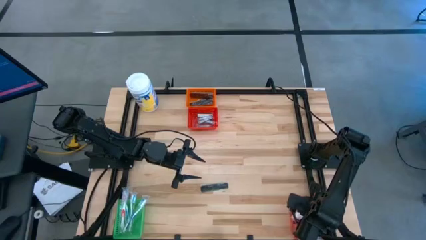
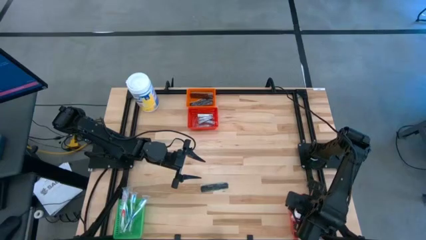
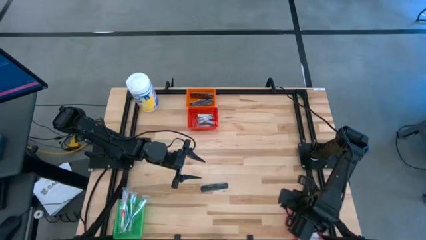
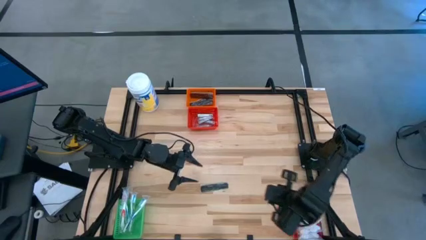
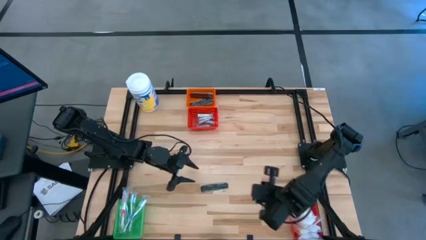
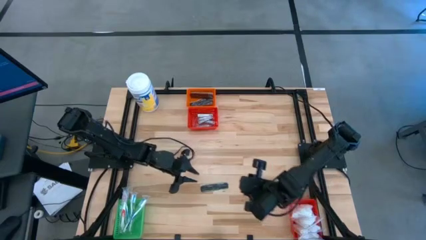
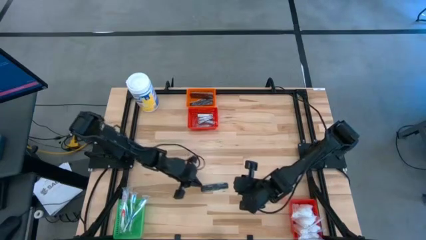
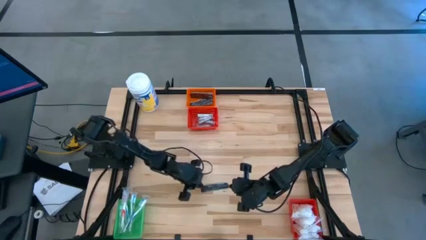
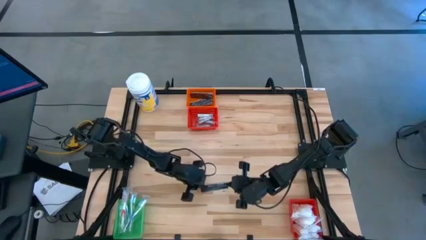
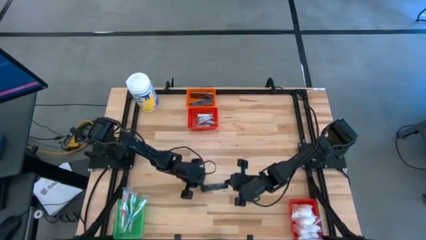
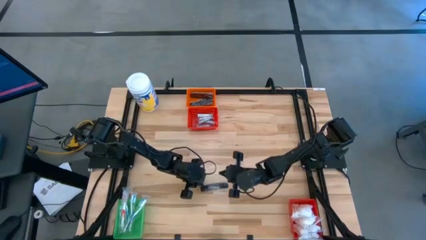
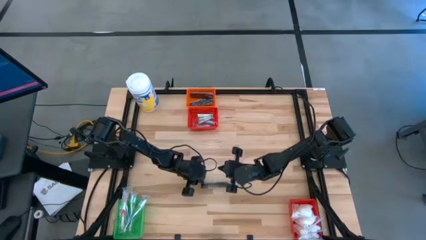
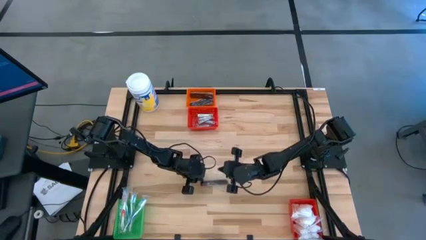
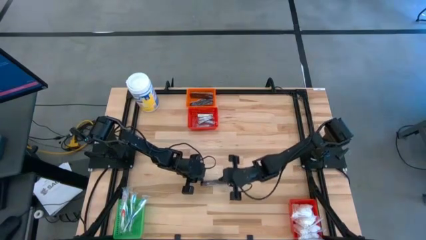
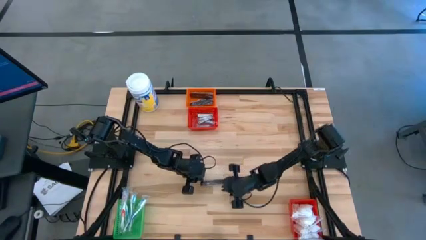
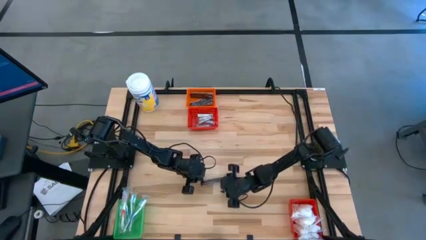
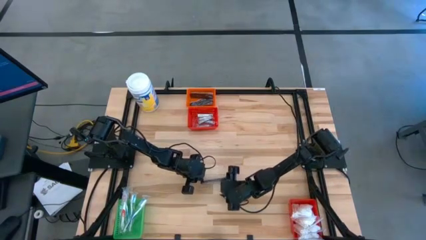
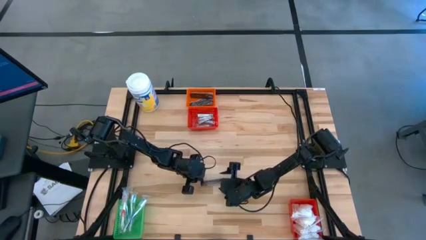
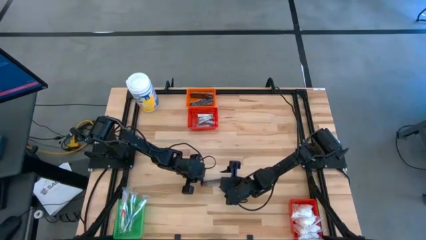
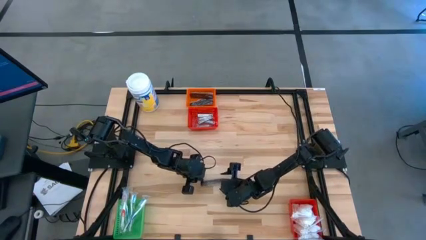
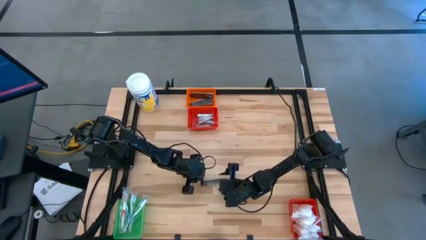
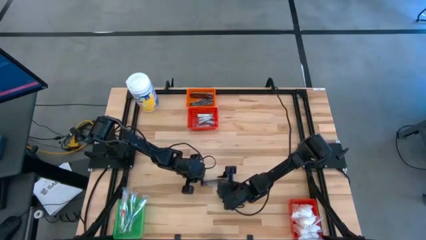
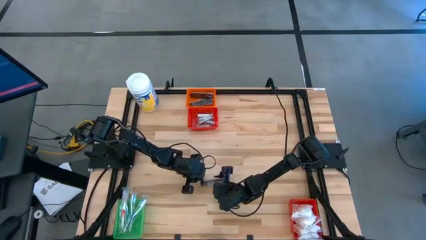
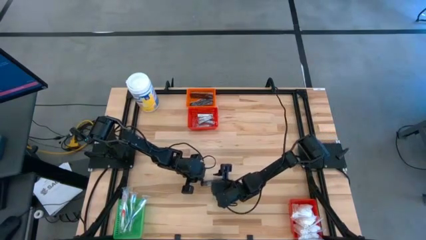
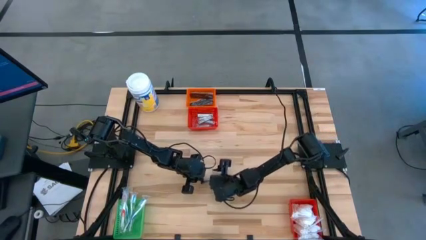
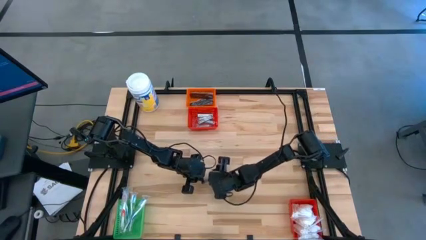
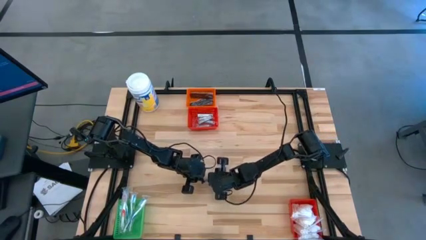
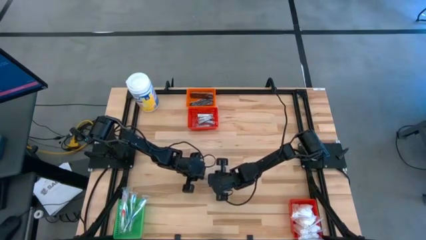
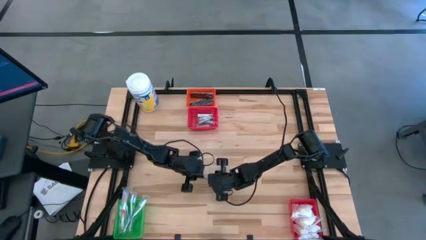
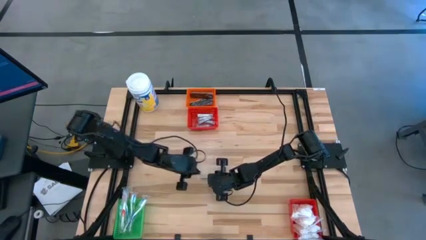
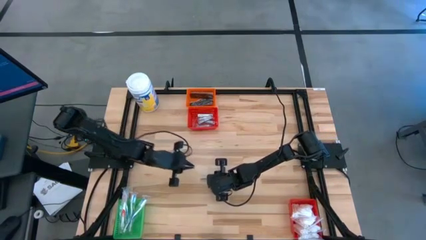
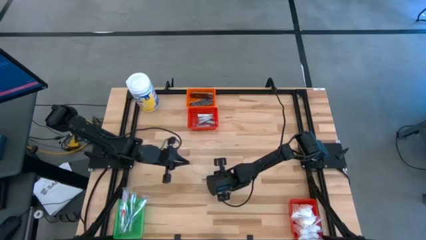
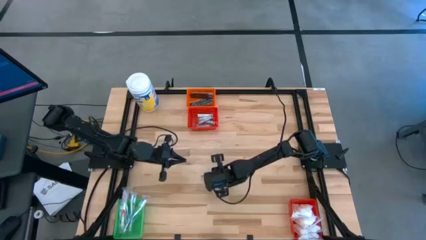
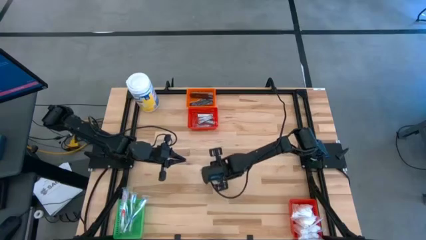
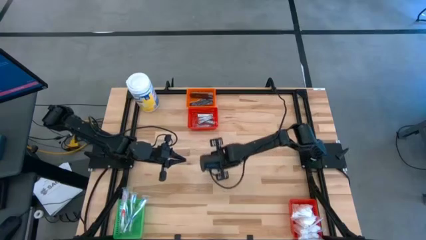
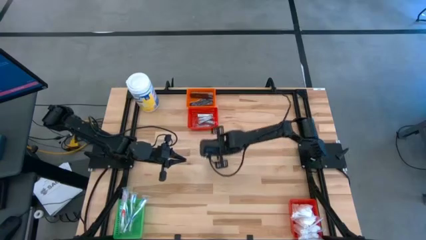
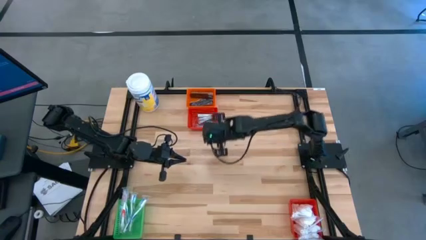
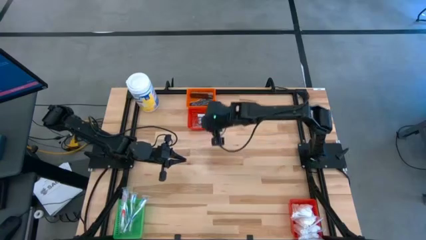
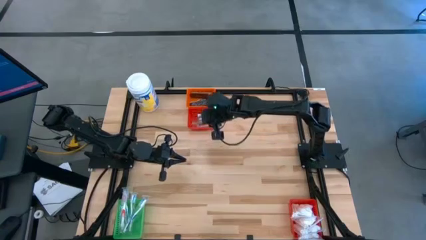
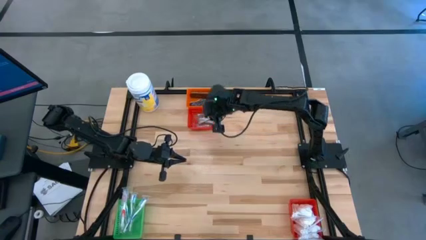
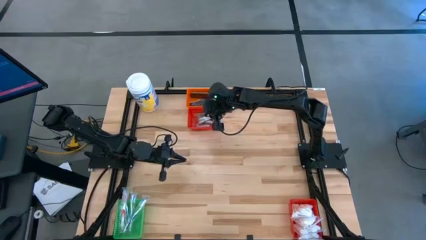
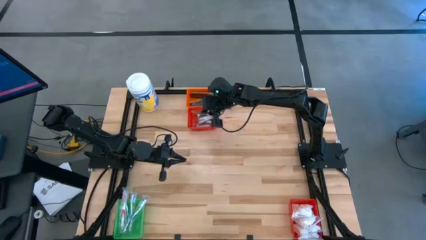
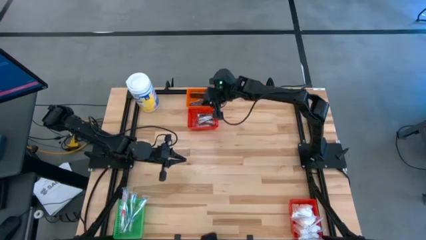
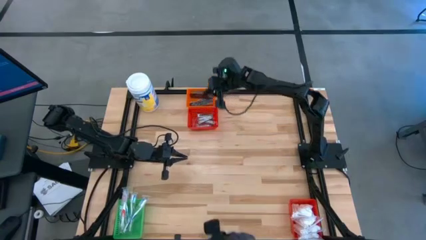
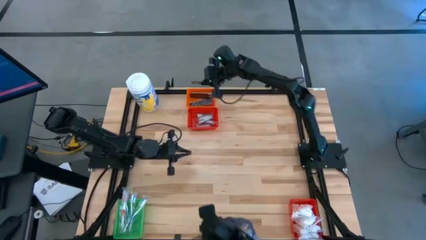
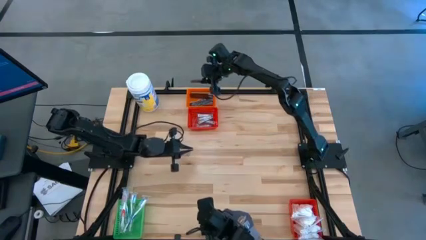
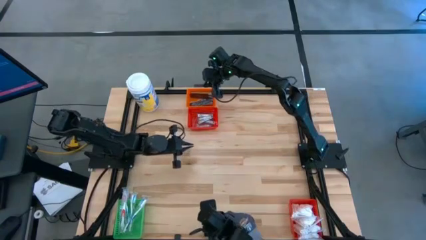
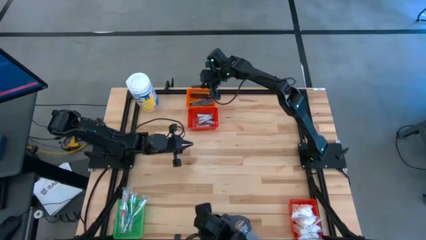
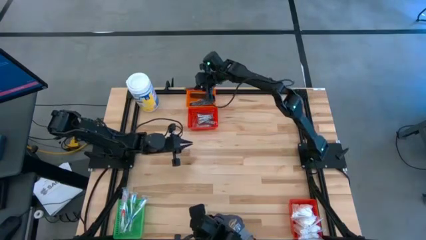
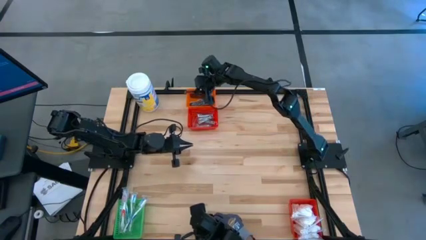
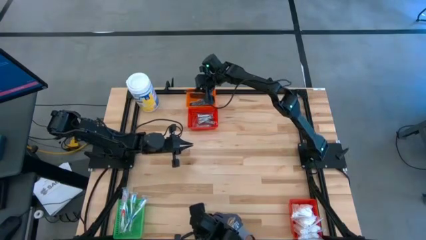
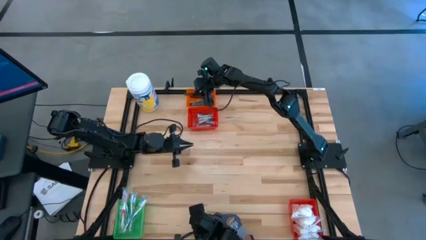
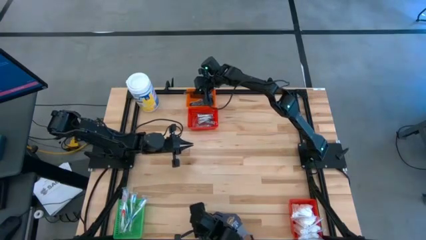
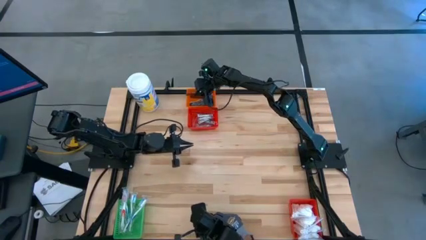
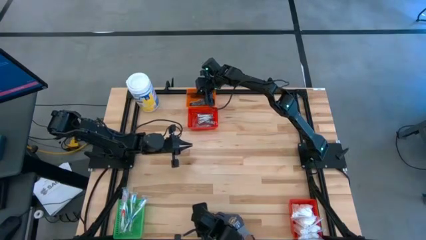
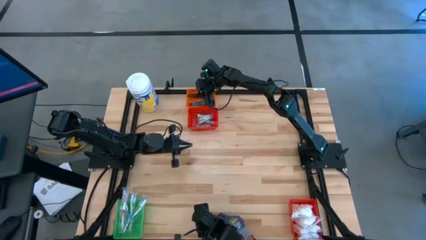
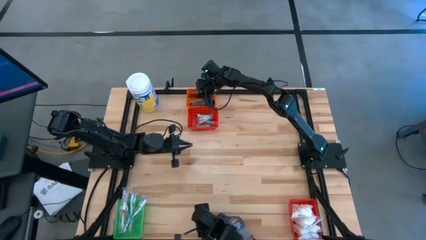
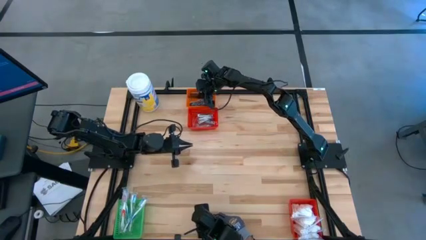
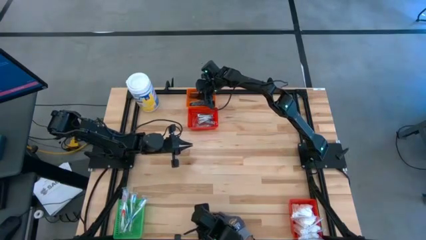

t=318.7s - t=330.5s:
Task: Pick & Place Travel size toiletries
Put the comb into the orange basket

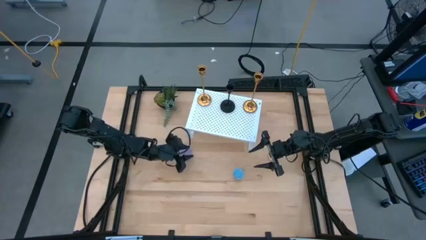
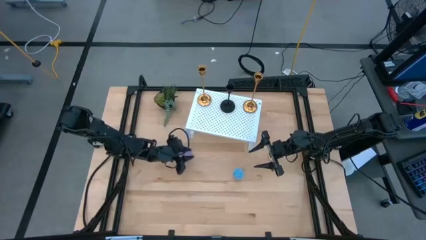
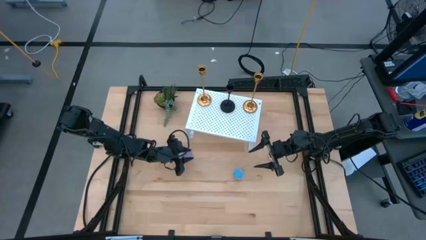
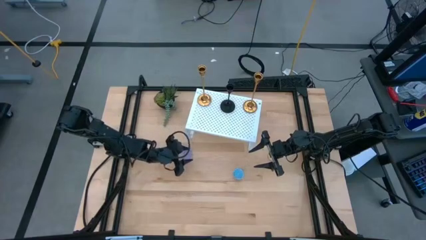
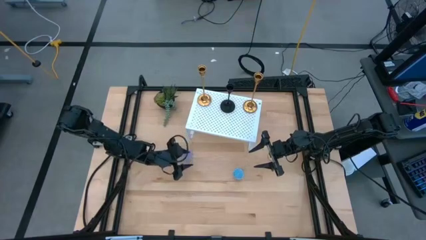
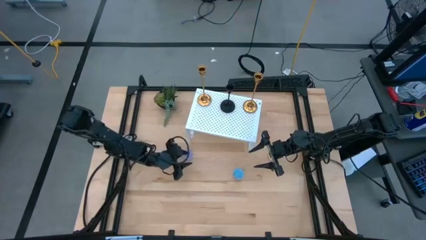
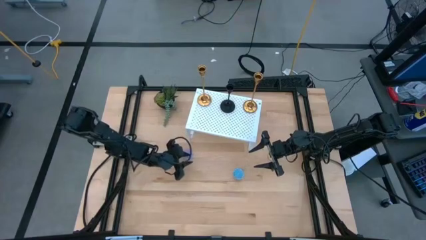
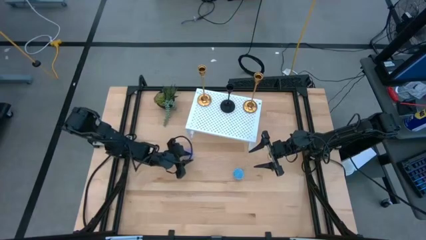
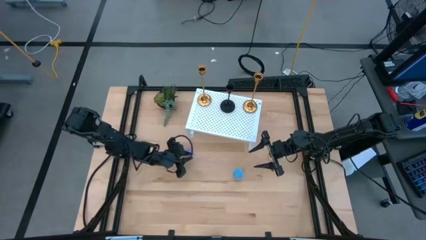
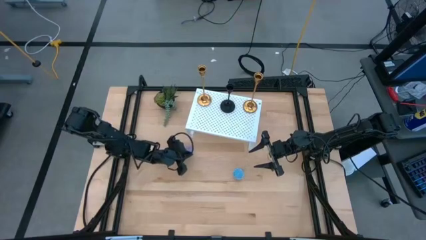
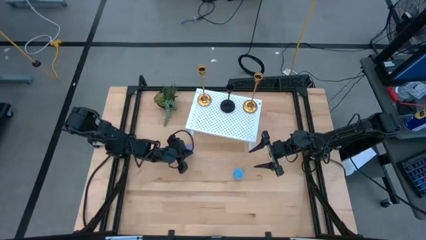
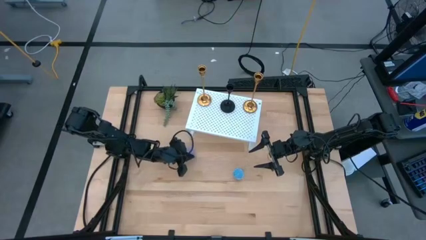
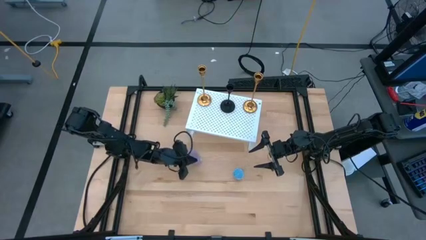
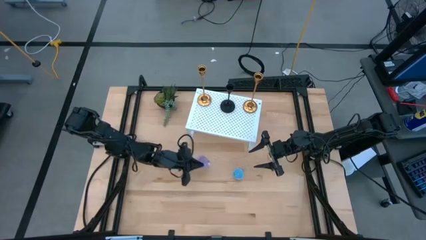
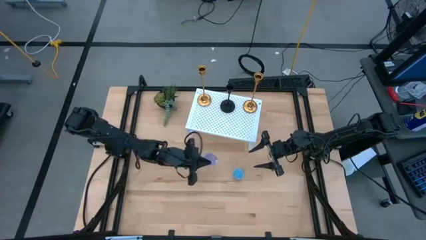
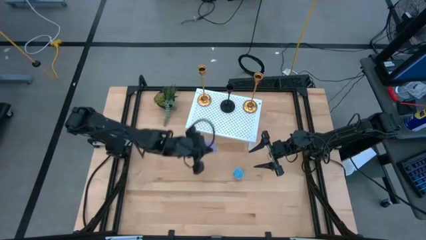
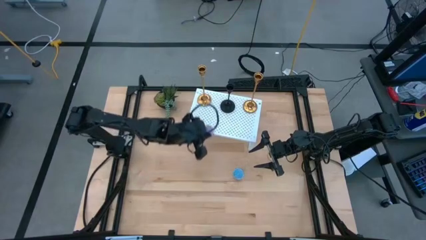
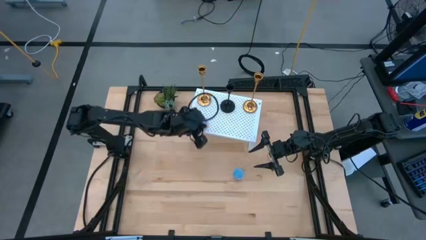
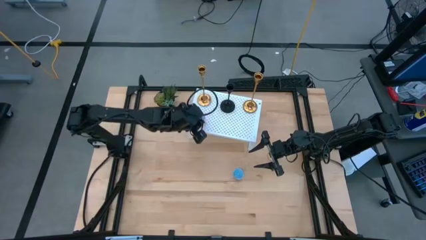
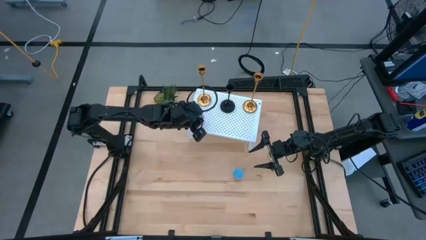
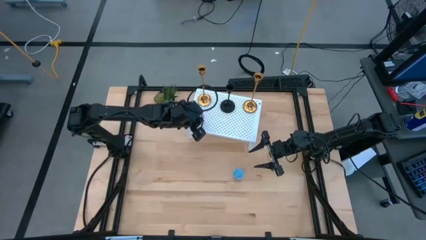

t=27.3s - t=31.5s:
Task: Pick & Place candle stick holders
Put the violet candle on the shelf

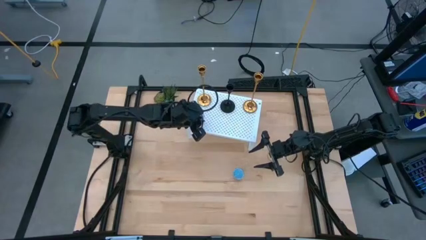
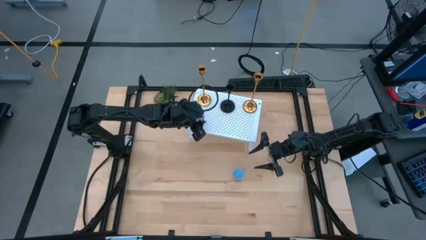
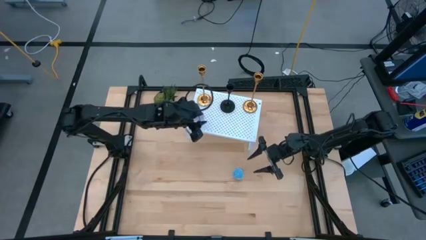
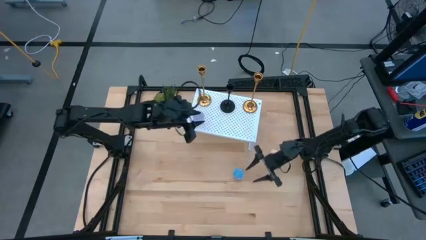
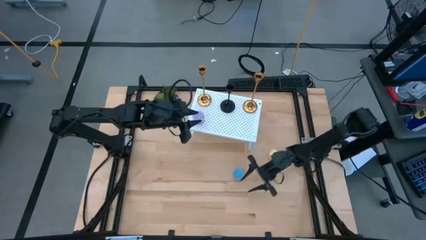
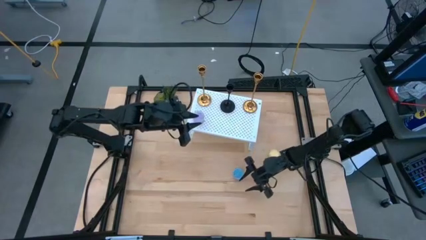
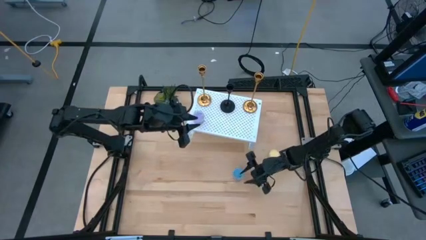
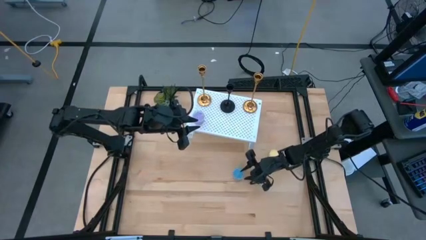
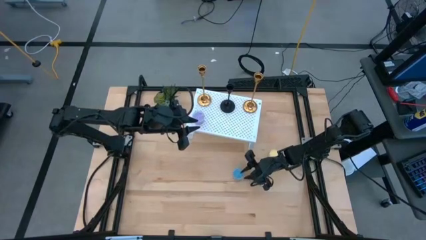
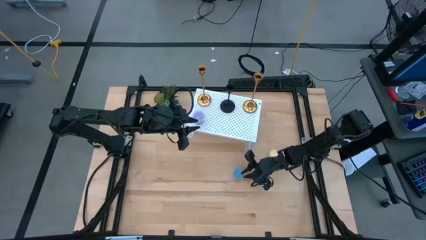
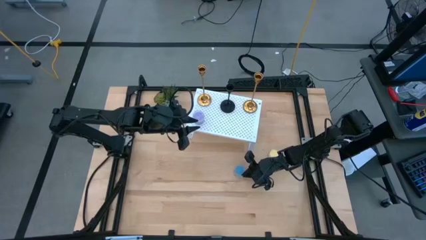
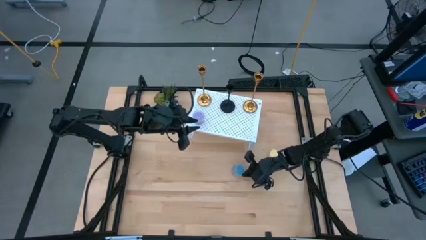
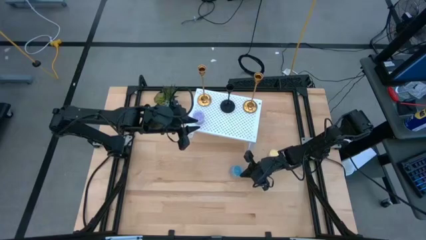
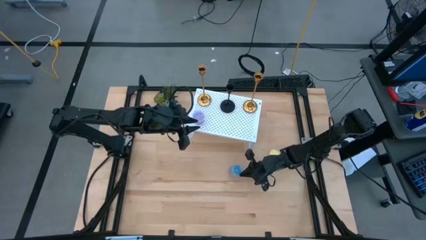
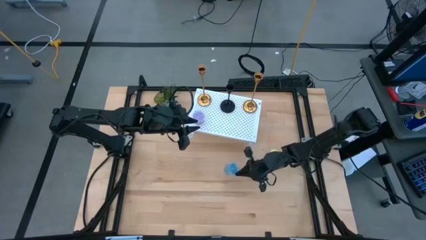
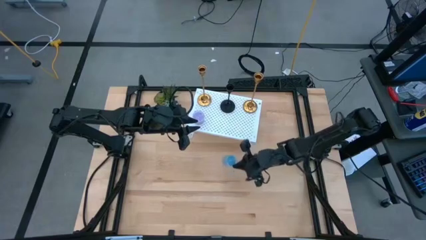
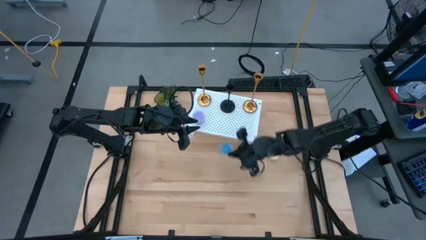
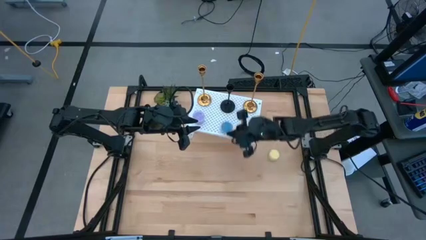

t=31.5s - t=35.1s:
Put the blue candle on the shelf aligned with the violet candle on the shelf
